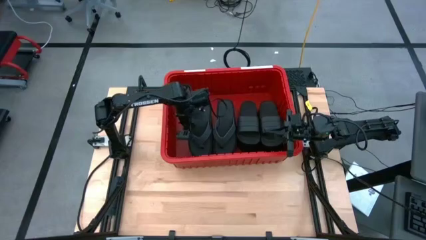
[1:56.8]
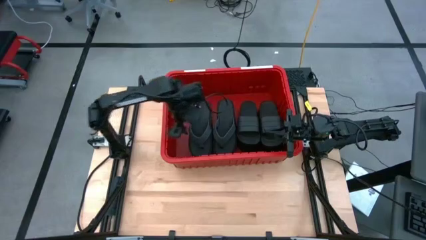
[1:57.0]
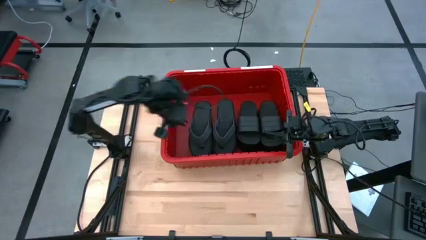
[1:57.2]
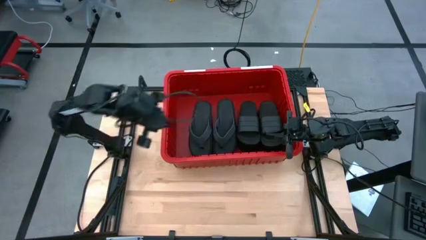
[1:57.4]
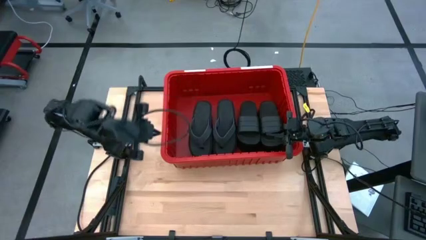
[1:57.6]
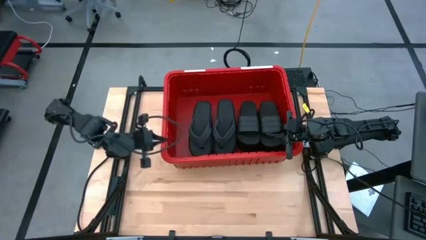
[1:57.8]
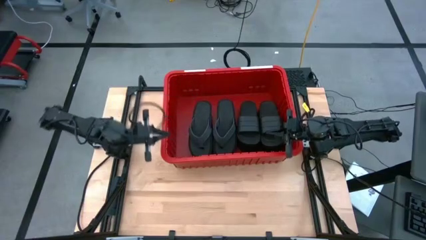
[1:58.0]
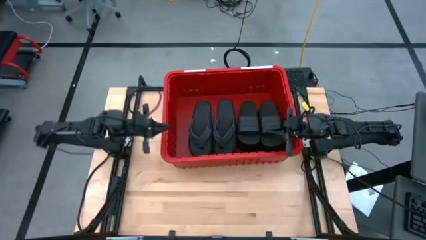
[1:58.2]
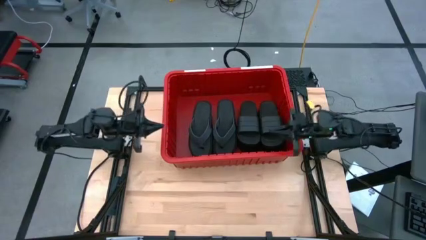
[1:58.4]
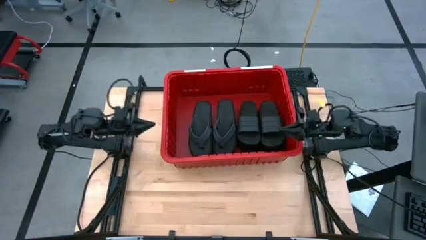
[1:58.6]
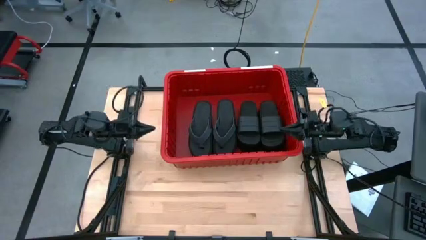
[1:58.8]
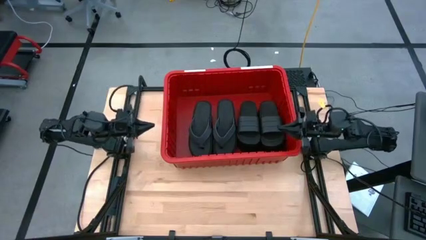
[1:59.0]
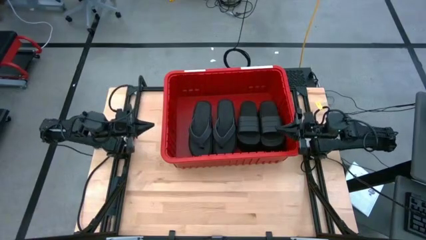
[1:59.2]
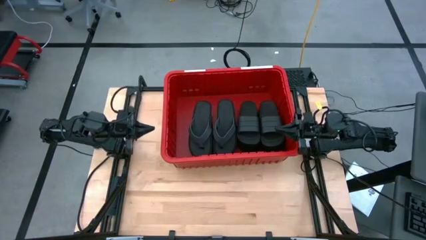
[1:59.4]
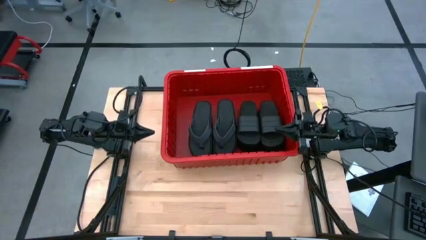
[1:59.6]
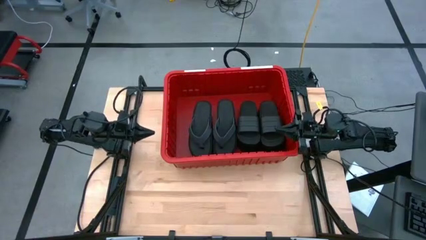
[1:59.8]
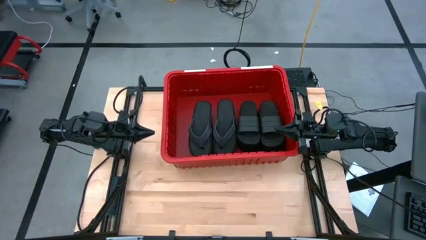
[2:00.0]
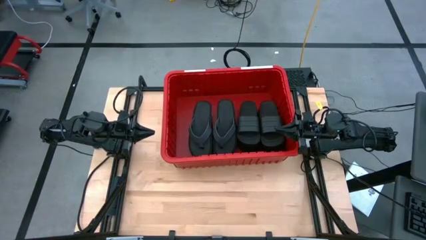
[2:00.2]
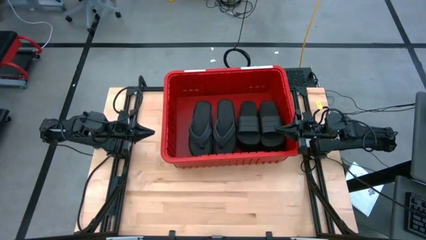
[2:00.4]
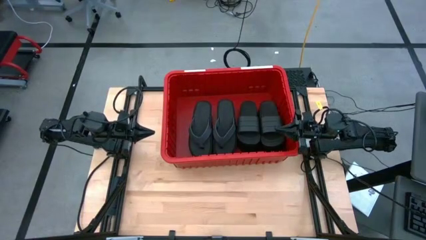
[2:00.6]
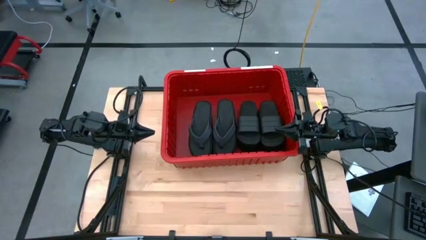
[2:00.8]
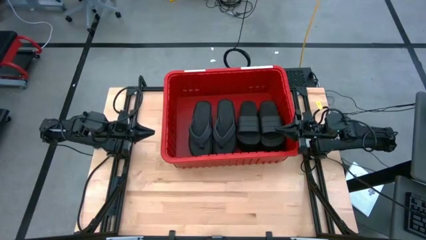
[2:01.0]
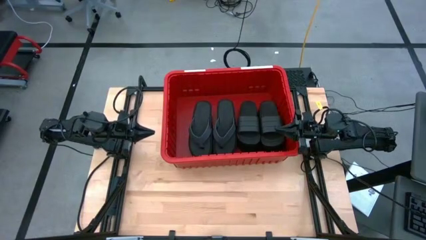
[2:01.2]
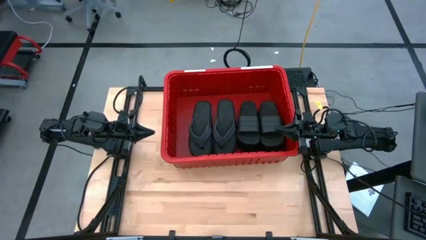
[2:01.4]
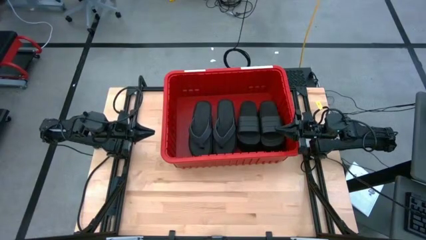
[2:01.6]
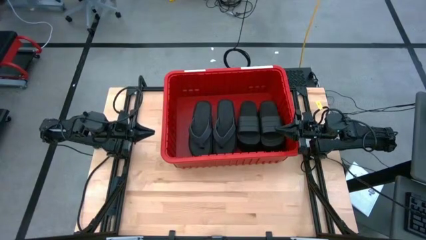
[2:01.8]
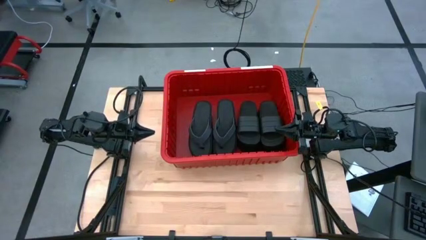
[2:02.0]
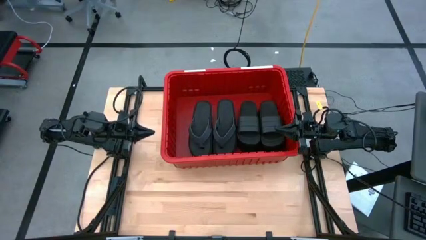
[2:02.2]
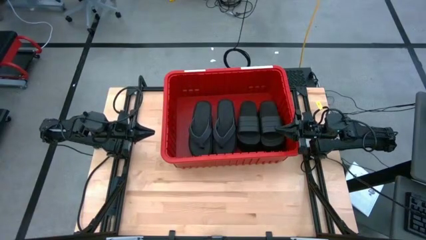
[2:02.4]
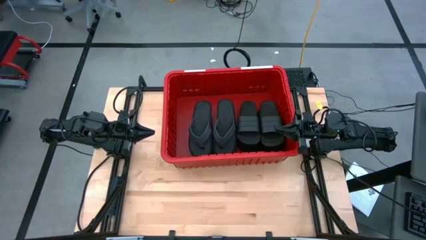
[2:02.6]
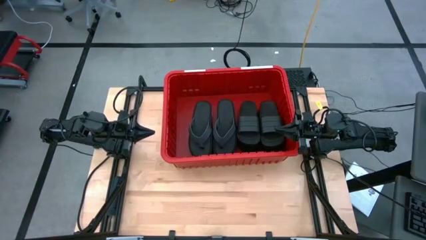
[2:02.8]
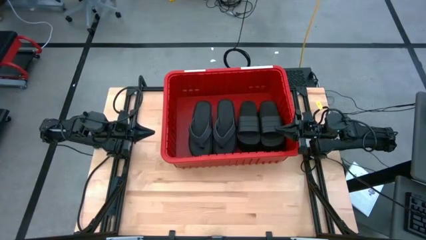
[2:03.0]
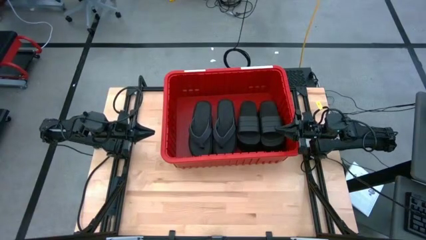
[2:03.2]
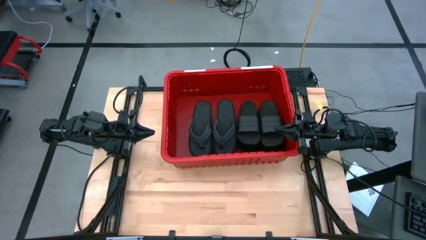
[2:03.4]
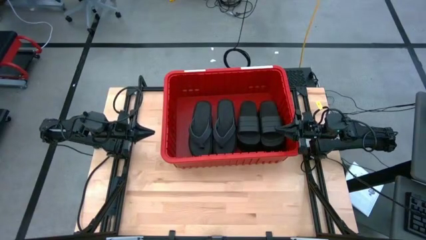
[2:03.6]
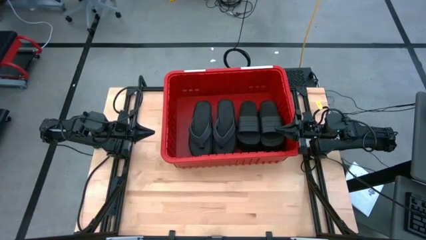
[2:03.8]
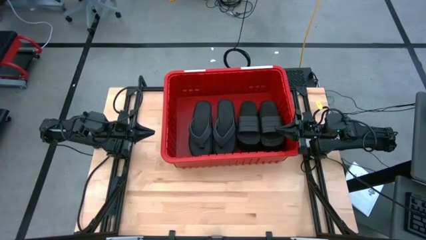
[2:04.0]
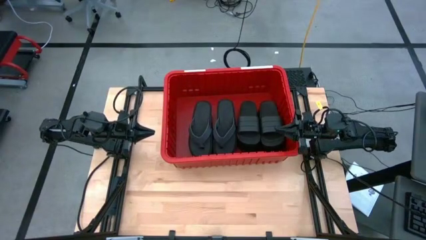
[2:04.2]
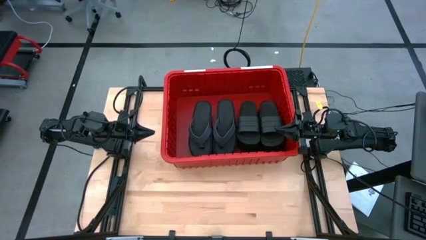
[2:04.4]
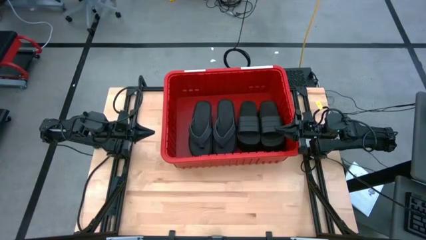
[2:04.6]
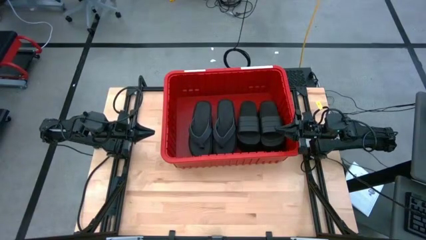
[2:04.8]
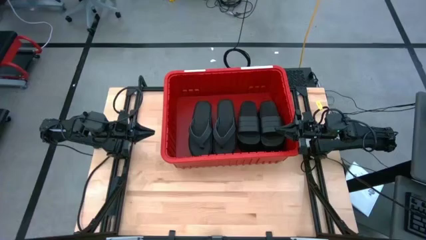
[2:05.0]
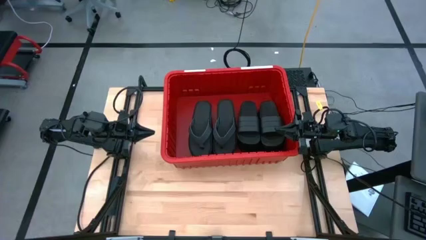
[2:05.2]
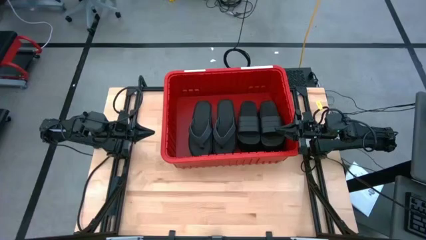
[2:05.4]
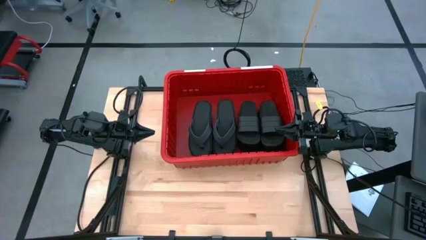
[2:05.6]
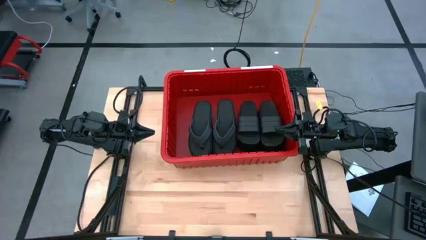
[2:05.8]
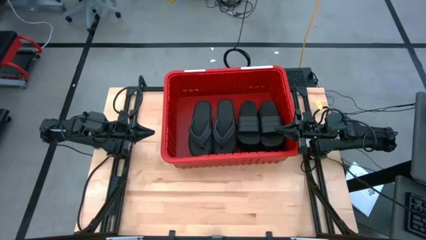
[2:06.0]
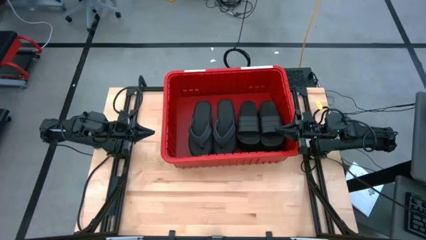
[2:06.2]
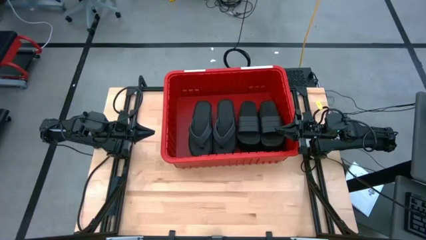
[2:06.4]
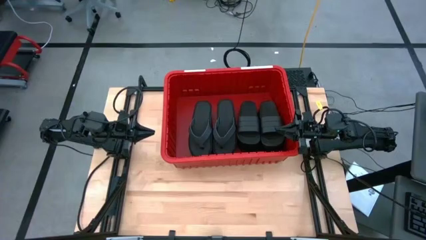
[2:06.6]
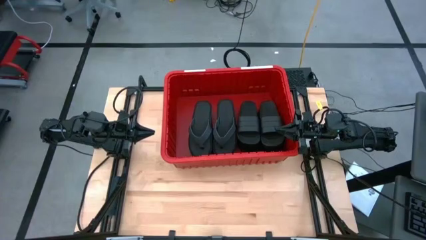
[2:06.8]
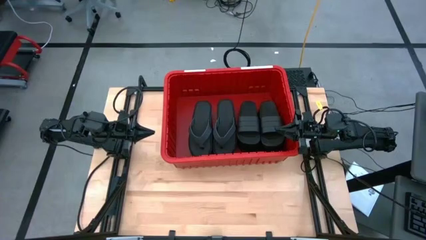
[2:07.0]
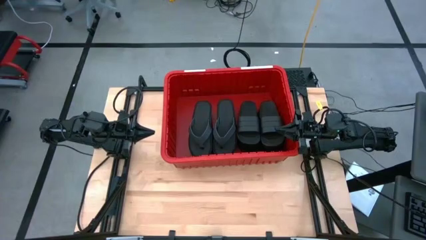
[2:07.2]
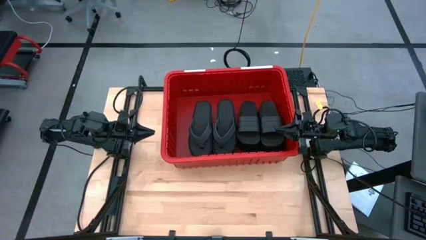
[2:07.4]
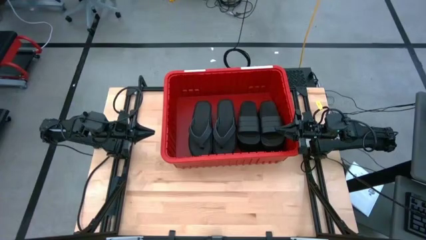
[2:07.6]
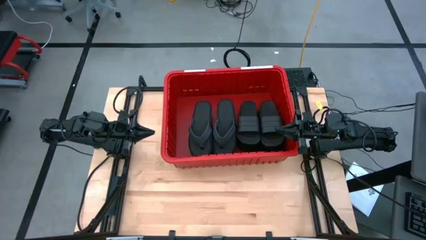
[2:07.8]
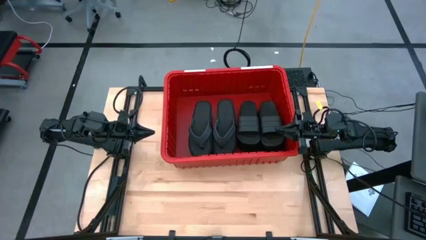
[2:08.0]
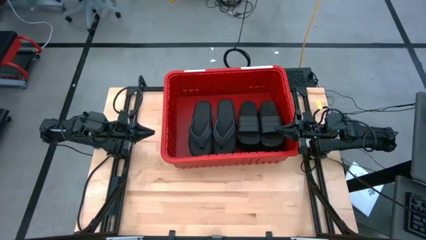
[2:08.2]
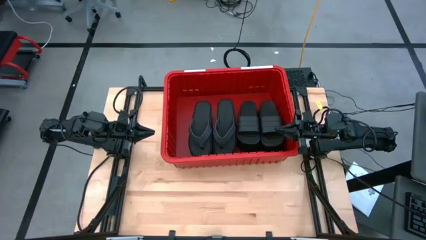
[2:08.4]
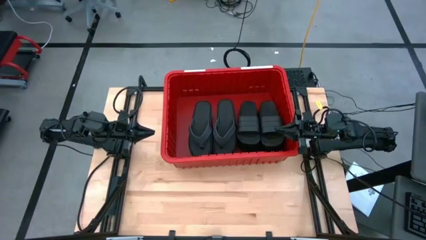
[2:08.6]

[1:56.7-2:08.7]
Task: Pick and place slides into bin
Return to Home Position

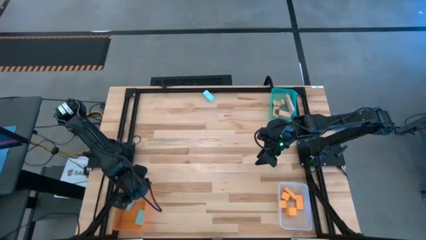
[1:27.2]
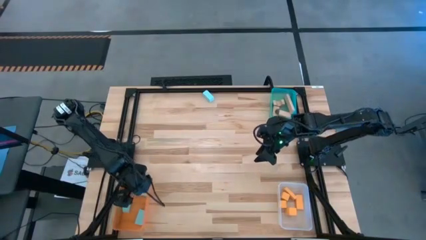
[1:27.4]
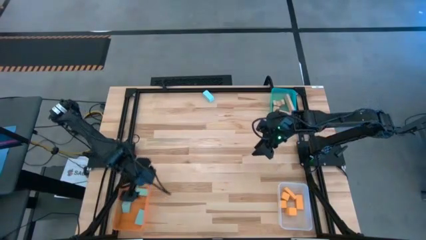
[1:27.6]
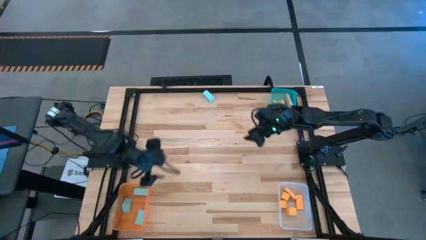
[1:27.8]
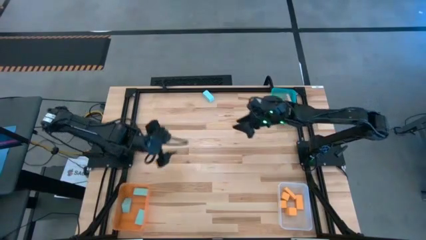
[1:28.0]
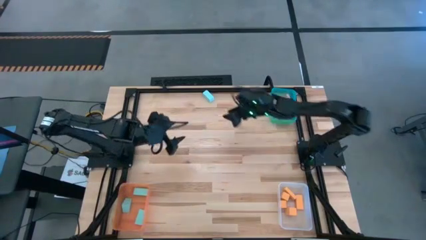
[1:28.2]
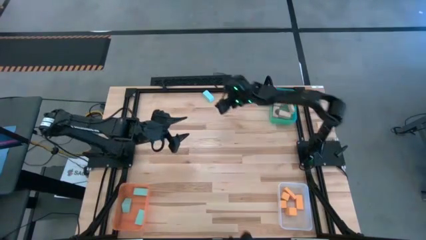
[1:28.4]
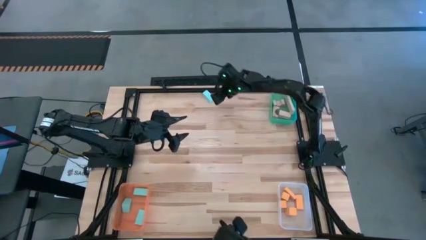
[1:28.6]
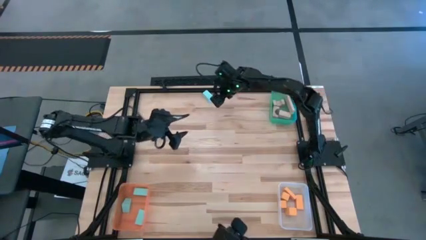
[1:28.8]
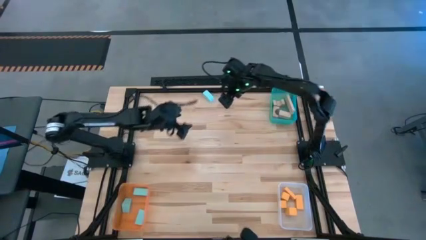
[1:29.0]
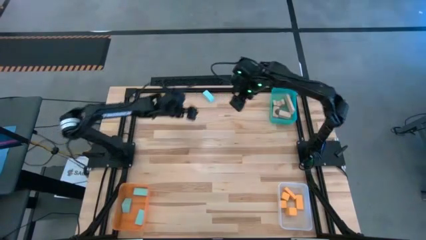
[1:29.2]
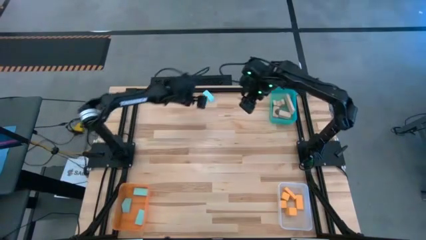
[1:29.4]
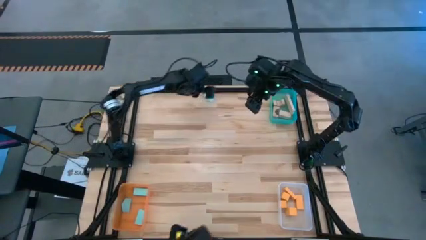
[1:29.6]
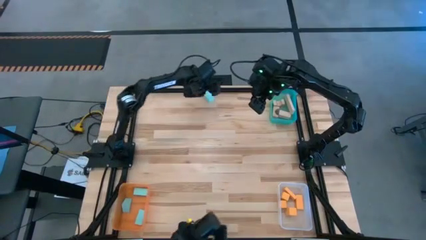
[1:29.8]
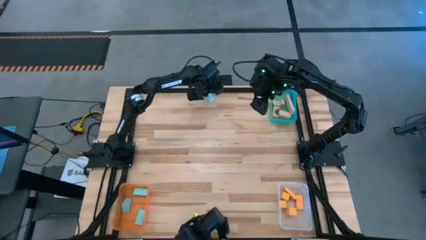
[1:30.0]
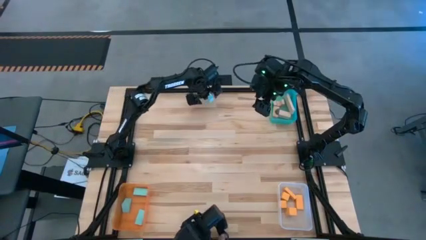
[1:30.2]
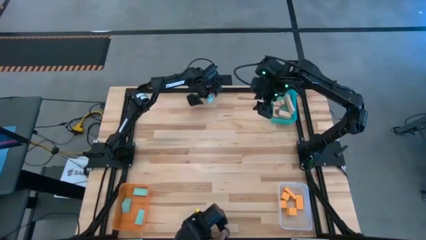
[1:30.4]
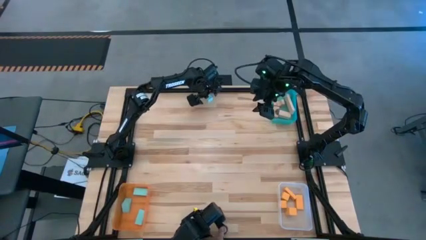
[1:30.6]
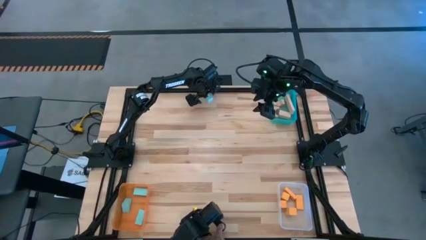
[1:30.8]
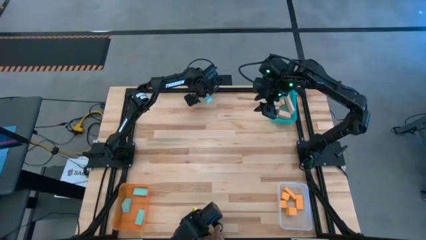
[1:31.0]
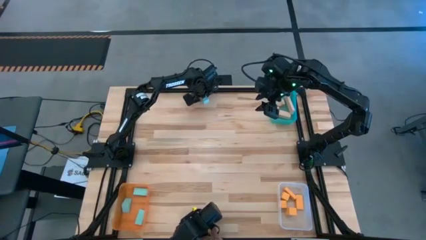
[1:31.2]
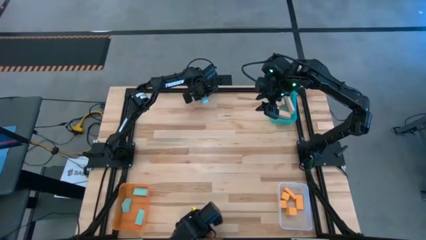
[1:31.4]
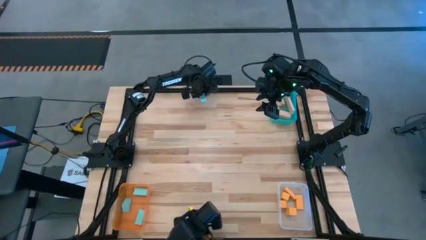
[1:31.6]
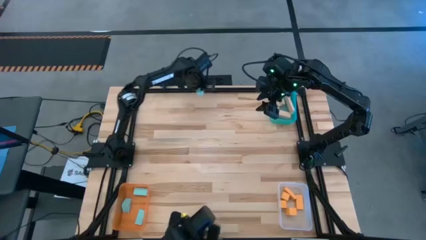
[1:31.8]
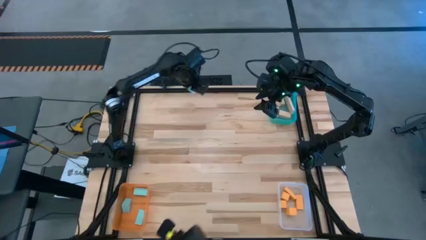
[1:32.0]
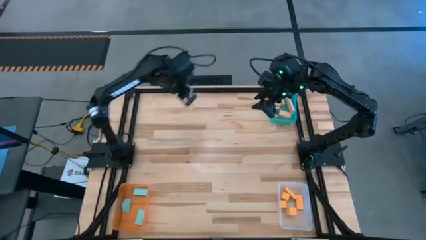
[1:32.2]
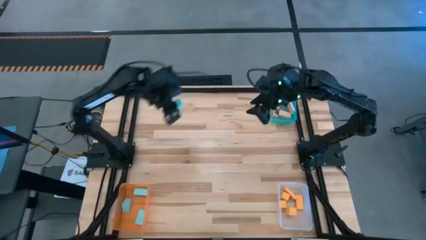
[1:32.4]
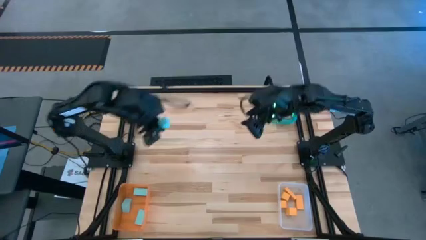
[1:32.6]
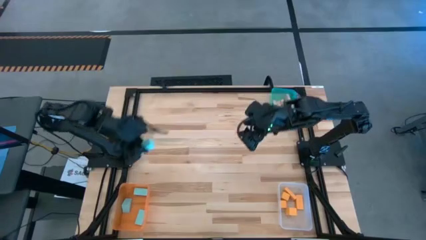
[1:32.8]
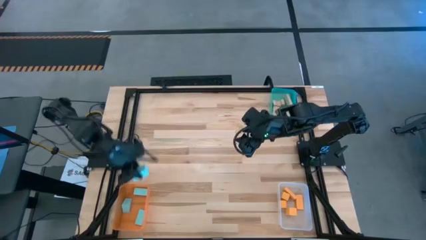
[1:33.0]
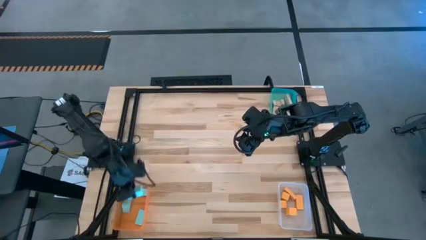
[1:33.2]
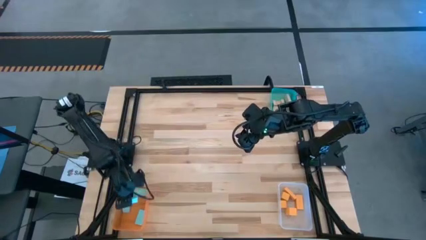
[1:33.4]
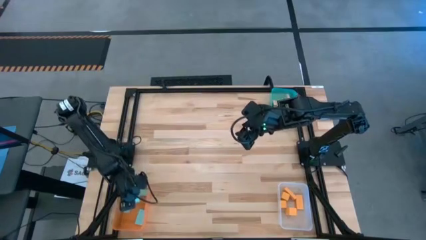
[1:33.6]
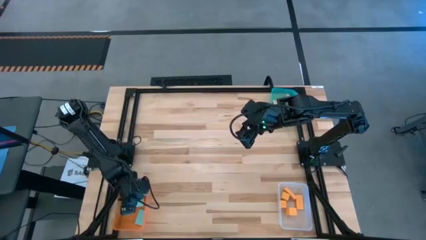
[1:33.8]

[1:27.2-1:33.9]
Task: Sort & place blocks by color
Put the blue block into the orange bin
